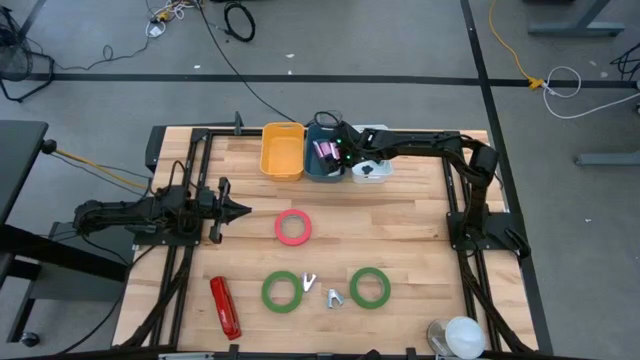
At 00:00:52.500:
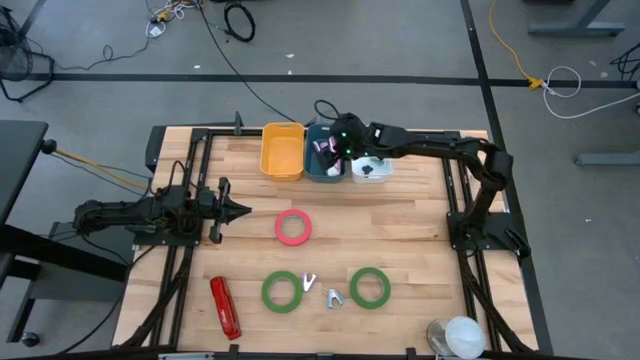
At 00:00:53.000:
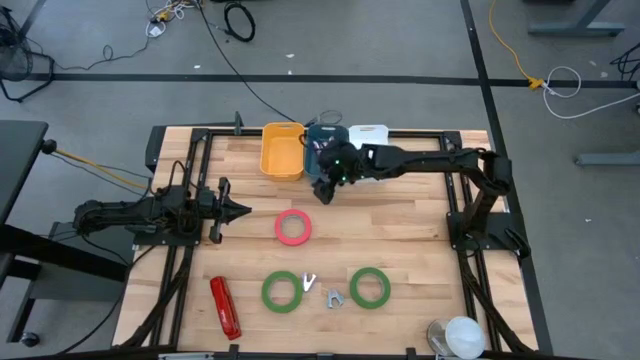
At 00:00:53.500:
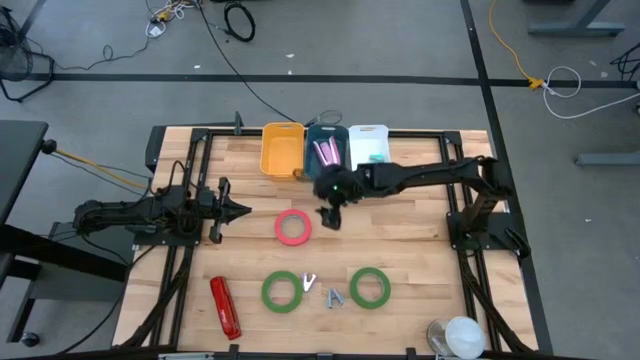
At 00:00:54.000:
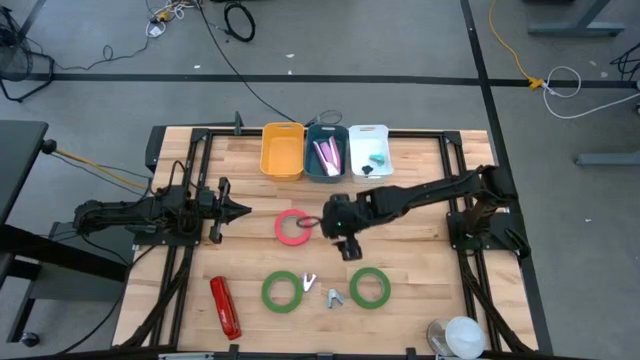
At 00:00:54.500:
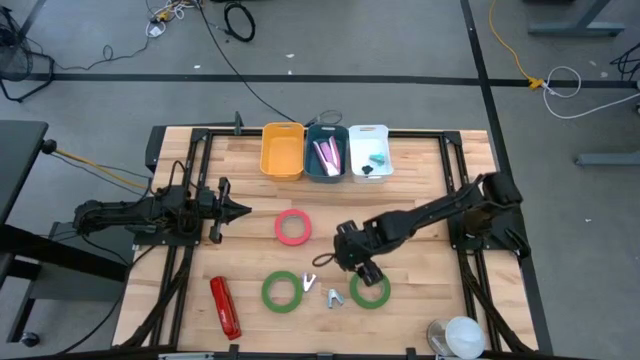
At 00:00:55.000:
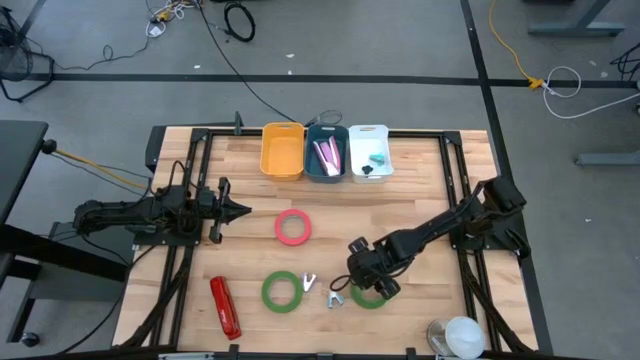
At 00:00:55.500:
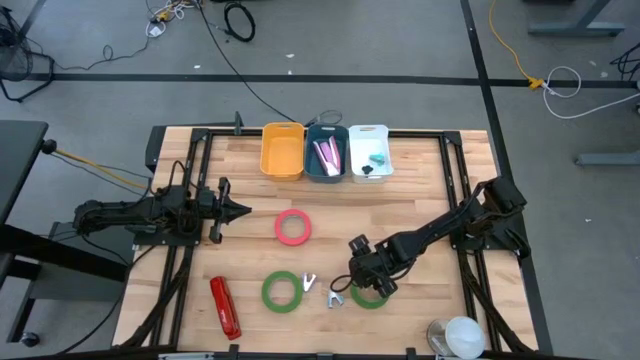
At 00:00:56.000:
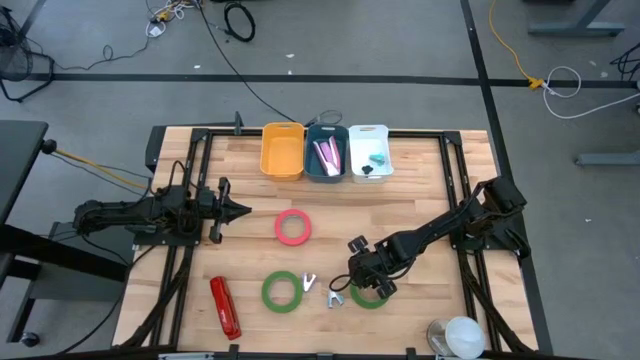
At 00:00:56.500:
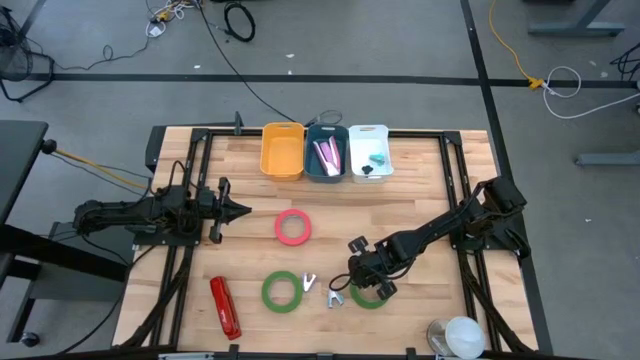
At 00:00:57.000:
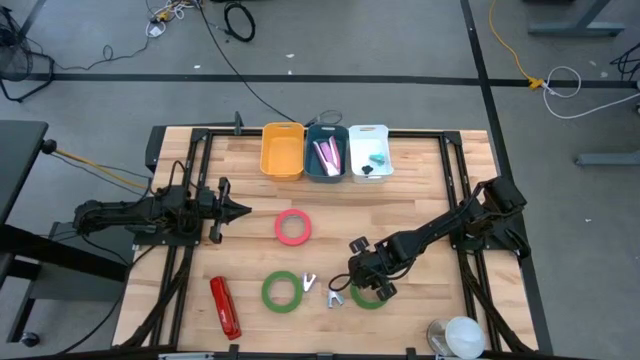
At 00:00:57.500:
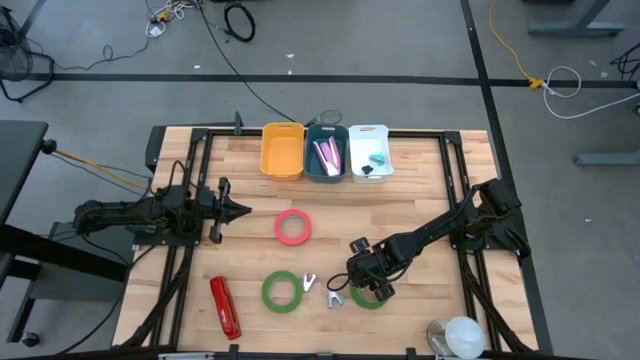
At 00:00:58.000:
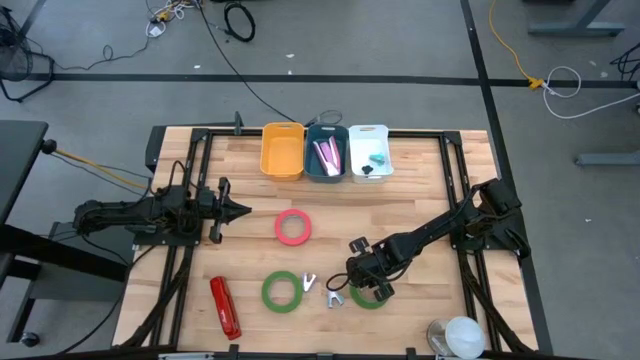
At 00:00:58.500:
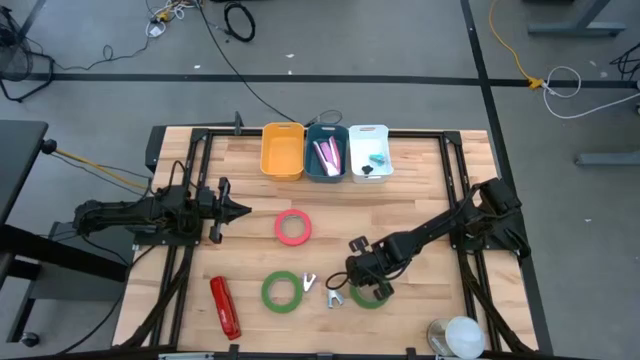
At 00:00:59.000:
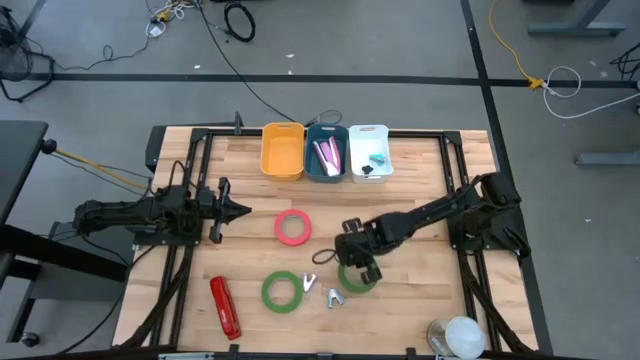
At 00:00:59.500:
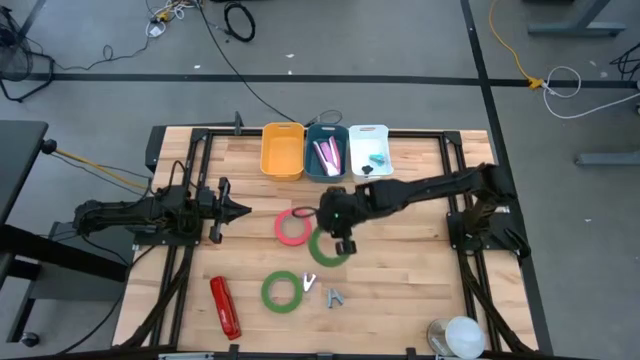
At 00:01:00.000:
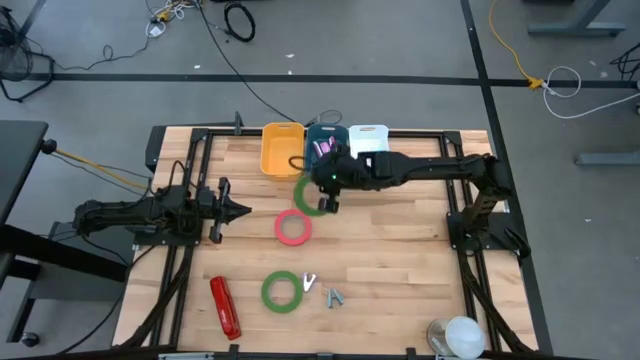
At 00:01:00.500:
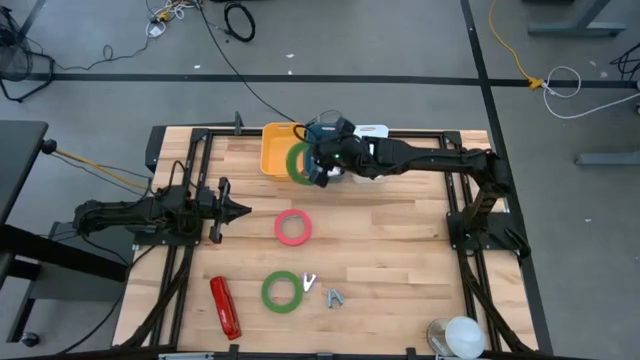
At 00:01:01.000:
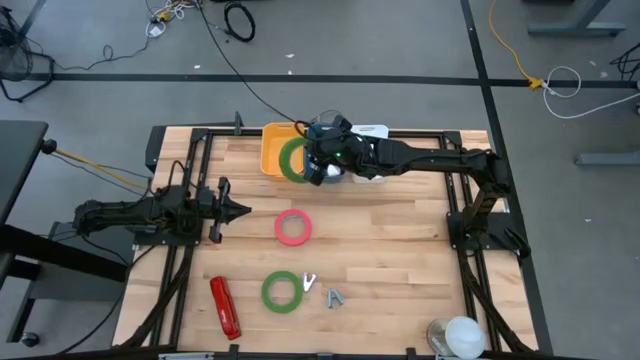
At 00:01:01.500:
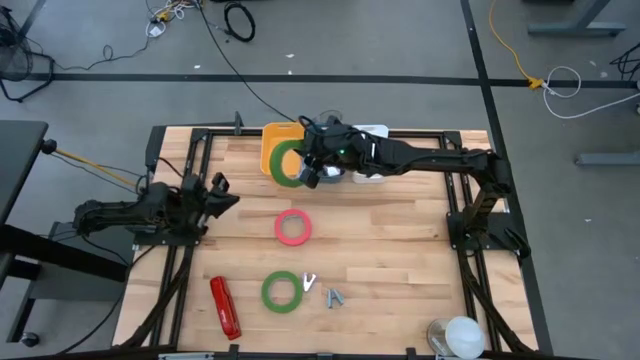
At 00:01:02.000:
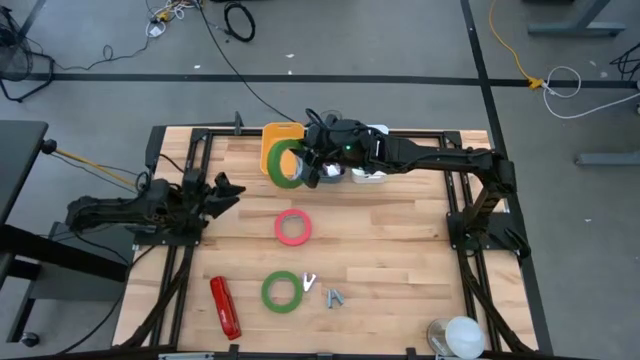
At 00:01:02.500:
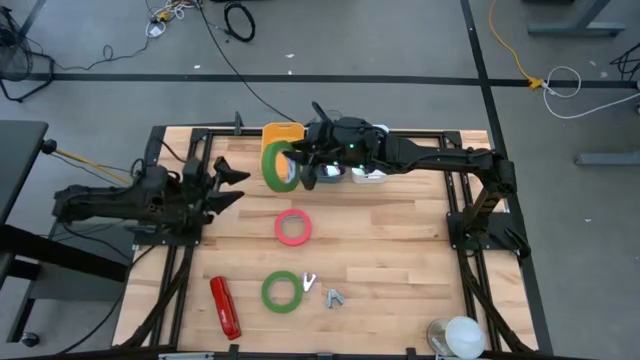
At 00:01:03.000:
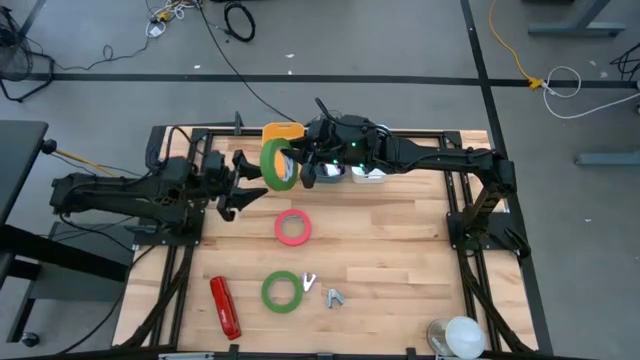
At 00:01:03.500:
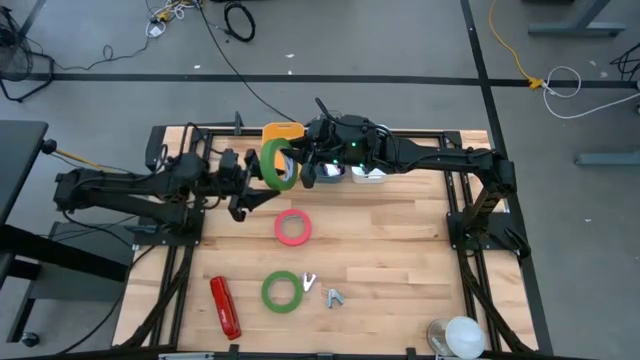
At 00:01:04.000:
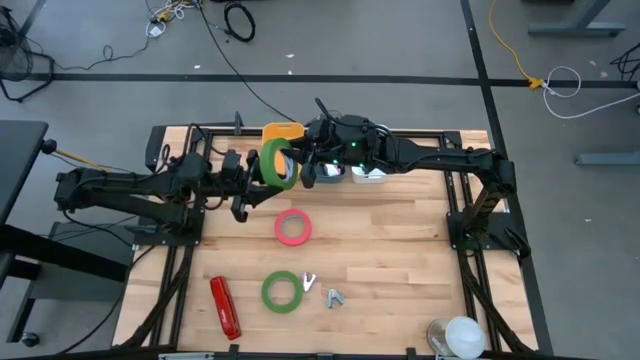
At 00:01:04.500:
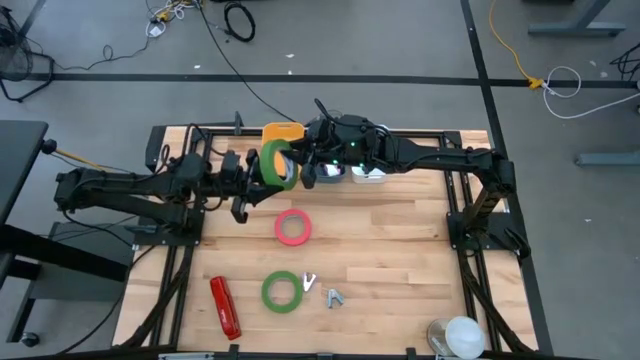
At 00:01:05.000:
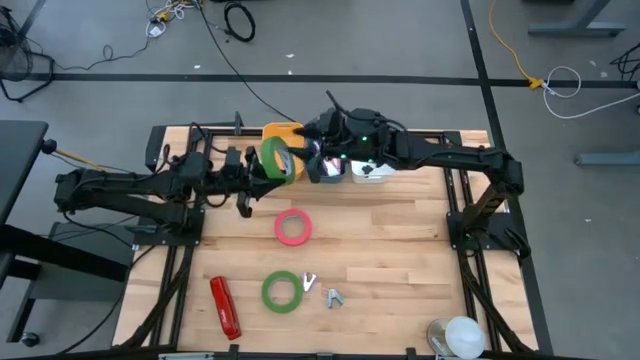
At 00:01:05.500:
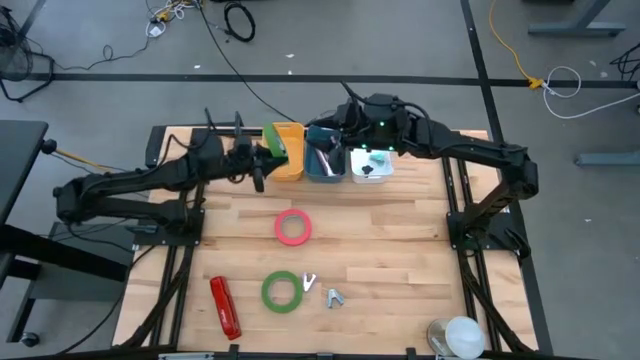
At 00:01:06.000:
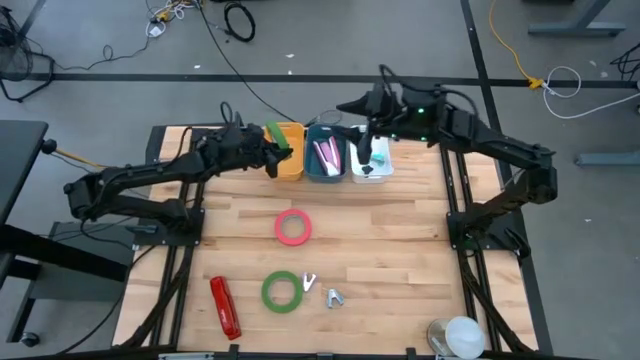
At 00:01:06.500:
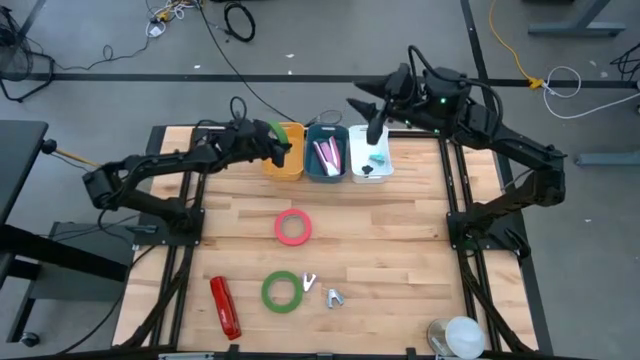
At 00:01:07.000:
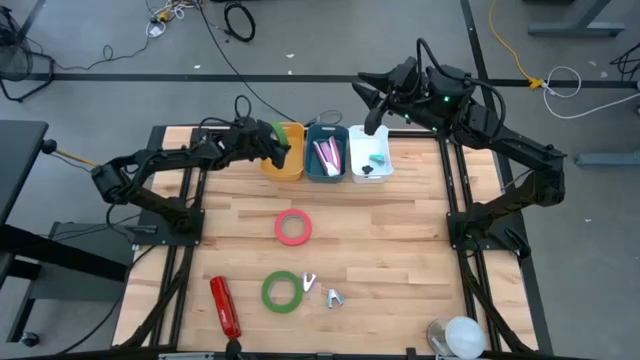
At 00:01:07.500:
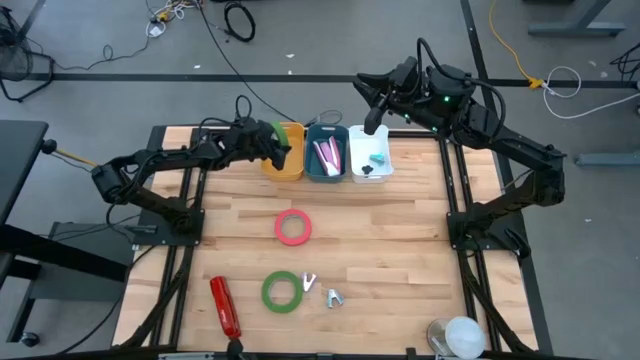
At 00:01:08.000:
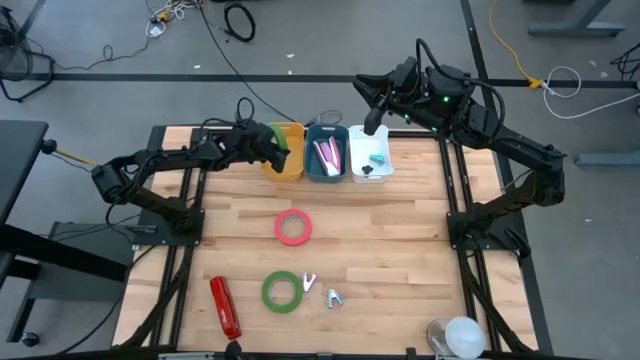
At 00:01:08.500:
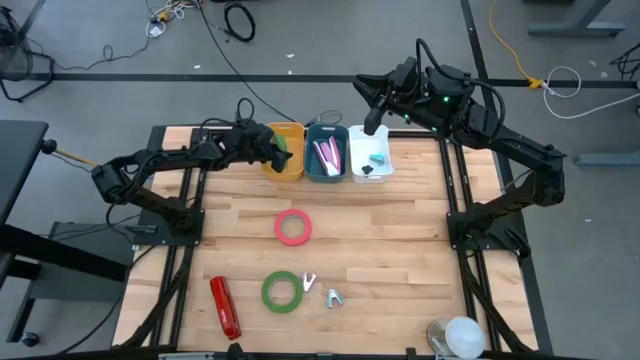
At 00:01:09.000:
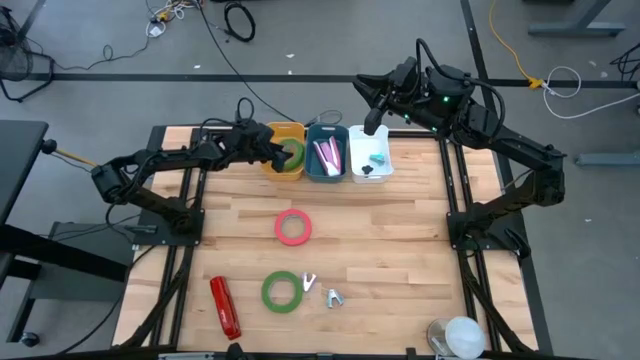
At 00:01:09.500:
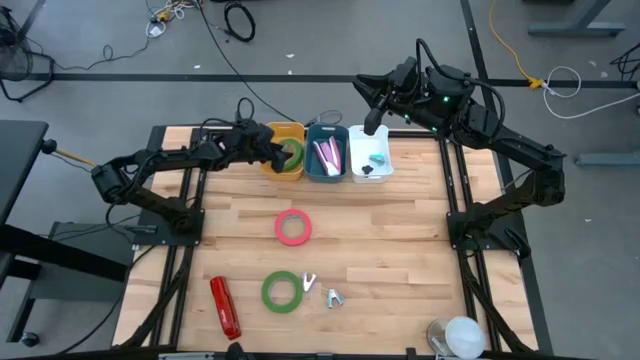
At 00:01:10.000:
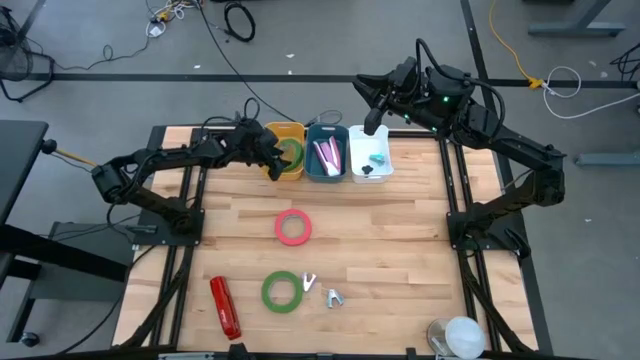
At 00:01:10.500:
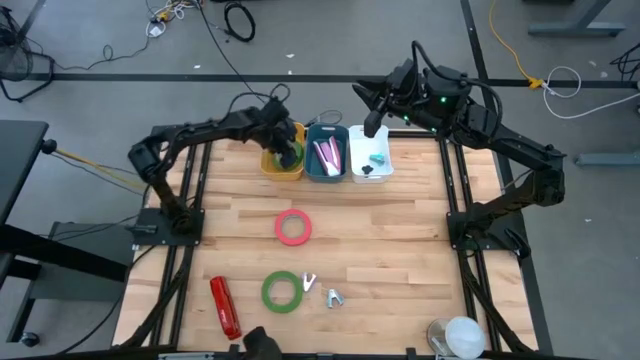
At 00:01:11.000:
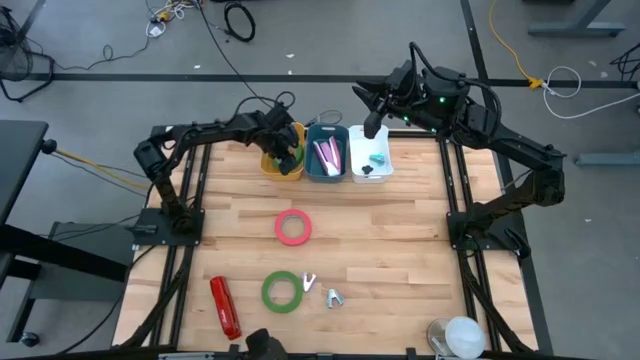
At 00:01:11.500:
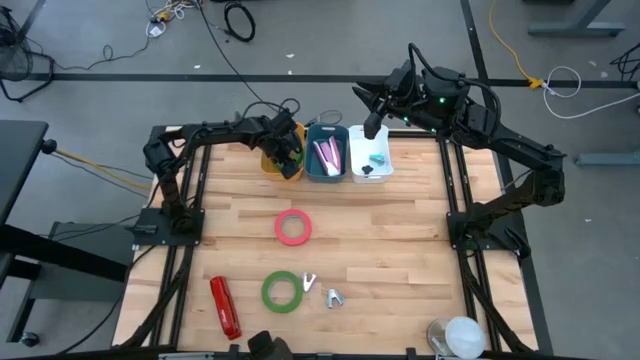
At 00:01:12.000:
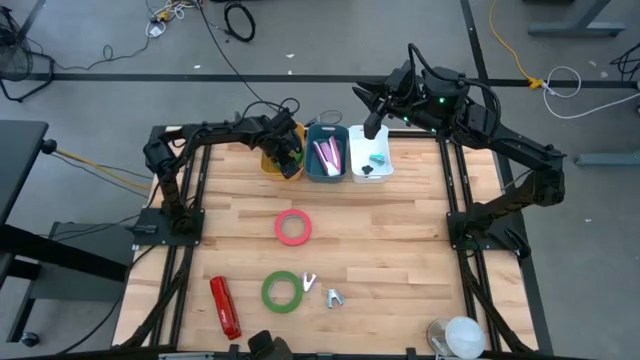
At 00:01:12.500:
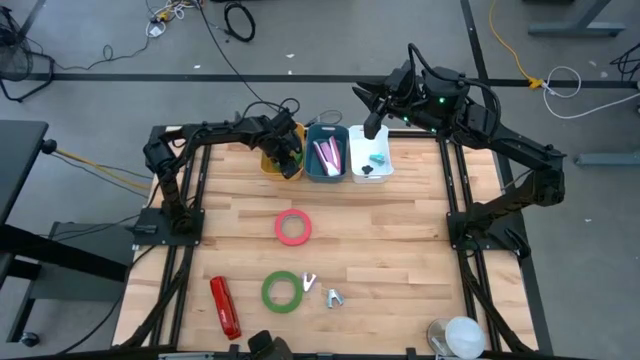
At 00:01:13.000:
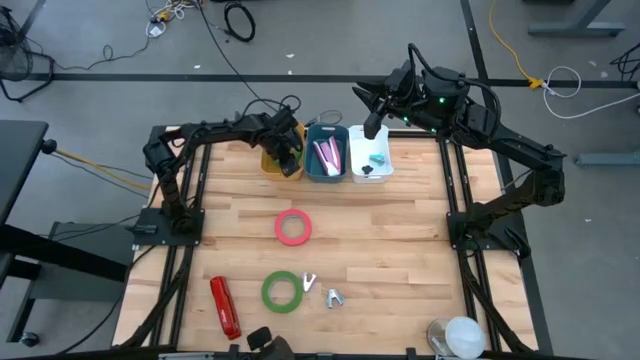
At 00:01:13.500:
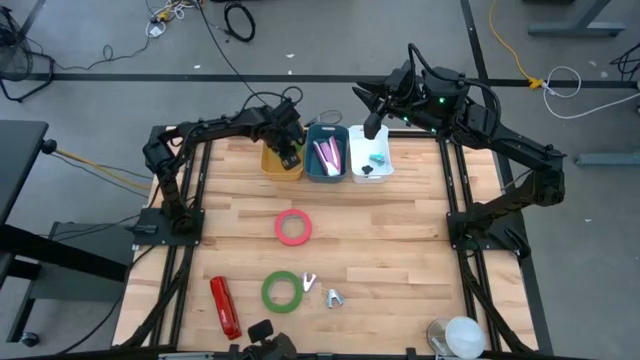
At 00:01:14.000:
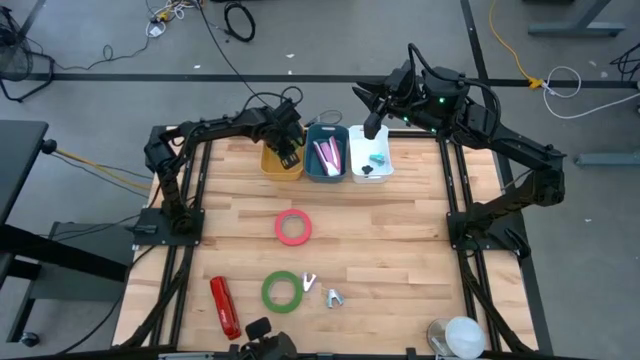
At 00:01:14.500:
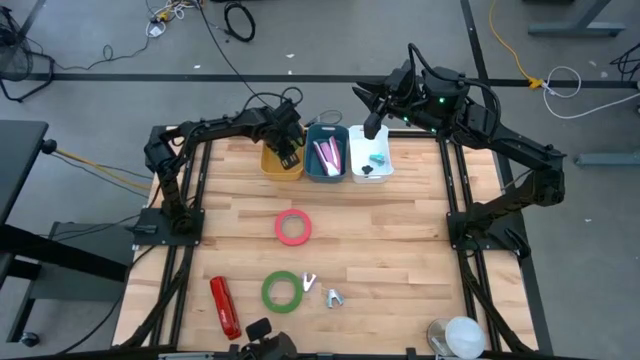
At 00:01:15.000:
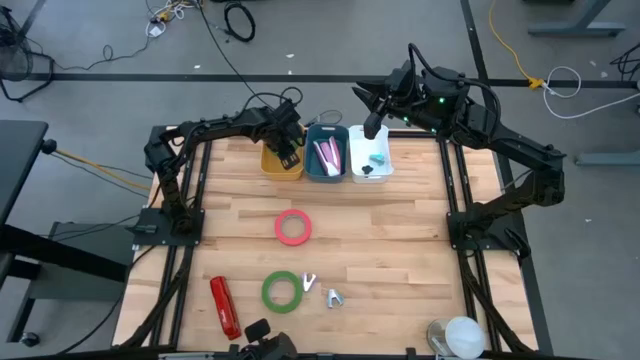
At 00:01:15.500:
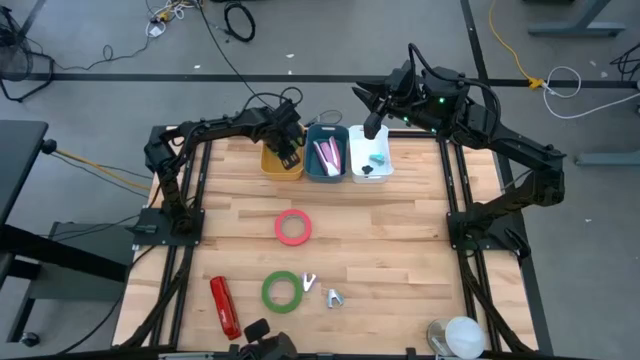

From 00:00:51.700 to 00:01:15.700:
Task: Pick and place Stapler, Stapler remover, tape
Put the right green tape into the yellow bin
